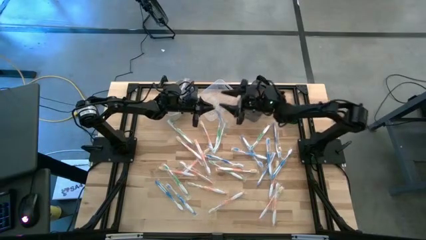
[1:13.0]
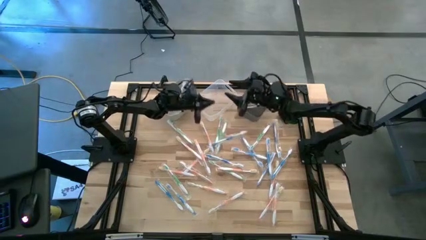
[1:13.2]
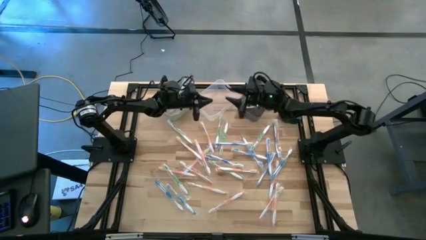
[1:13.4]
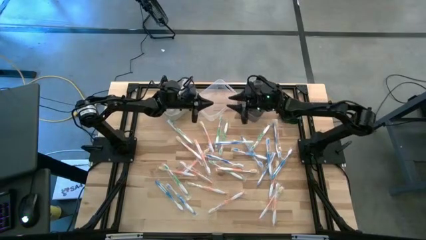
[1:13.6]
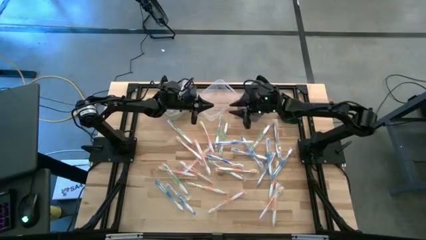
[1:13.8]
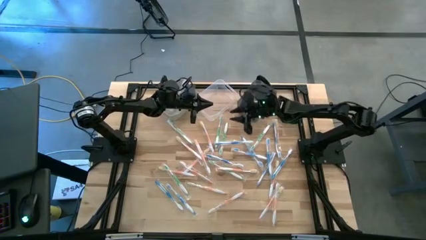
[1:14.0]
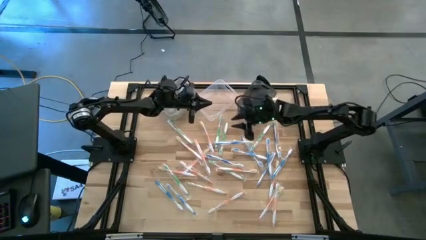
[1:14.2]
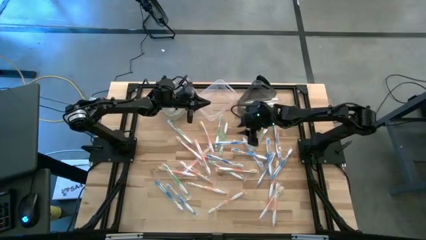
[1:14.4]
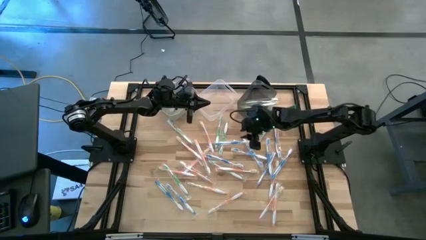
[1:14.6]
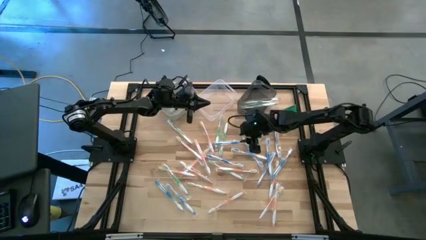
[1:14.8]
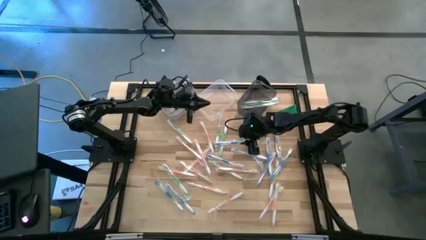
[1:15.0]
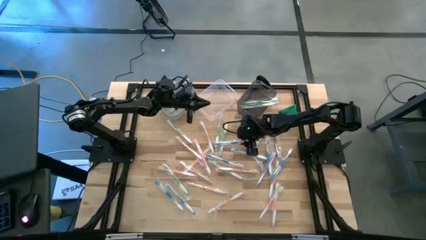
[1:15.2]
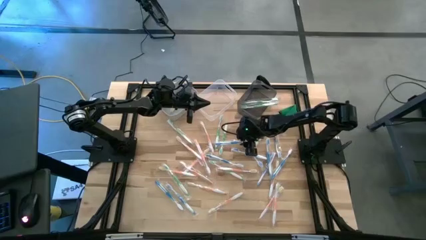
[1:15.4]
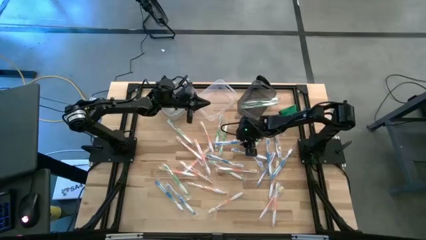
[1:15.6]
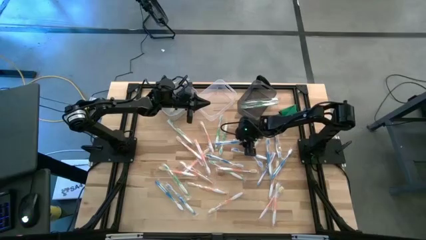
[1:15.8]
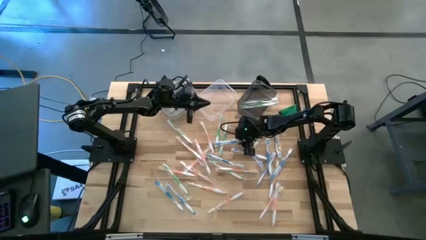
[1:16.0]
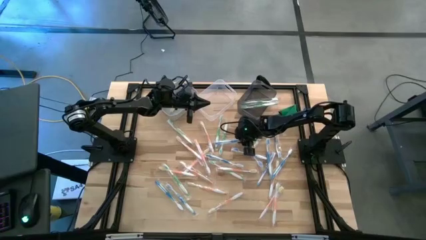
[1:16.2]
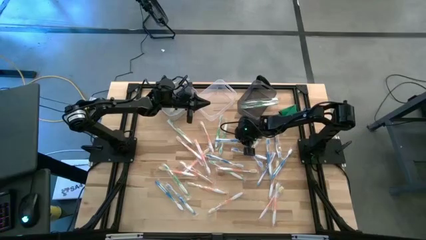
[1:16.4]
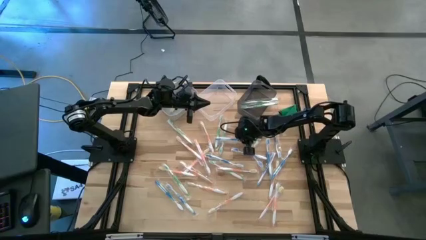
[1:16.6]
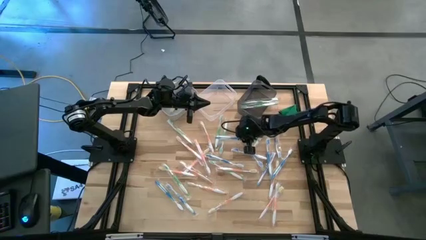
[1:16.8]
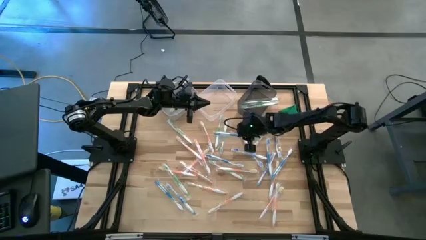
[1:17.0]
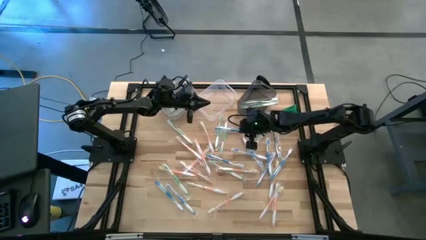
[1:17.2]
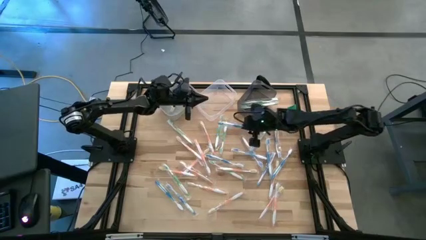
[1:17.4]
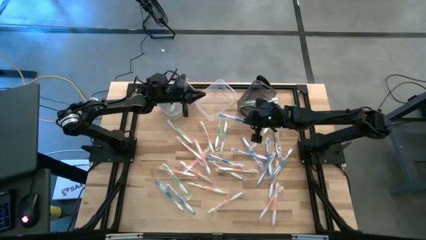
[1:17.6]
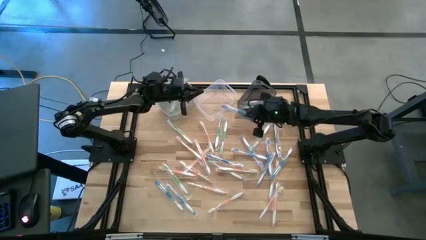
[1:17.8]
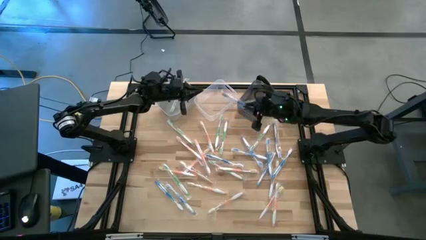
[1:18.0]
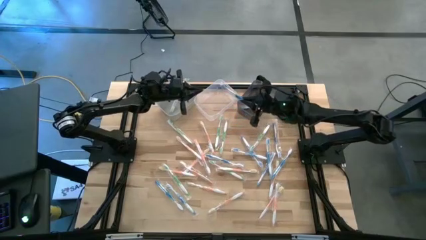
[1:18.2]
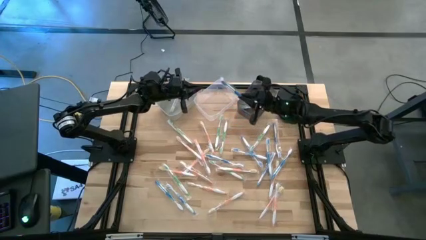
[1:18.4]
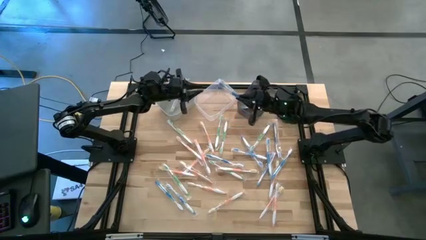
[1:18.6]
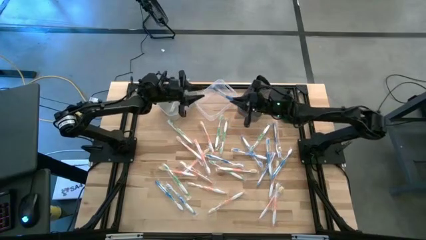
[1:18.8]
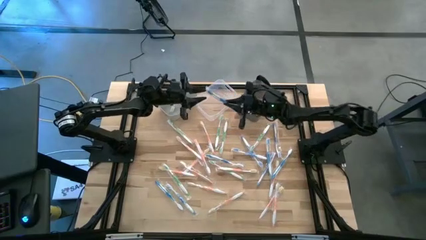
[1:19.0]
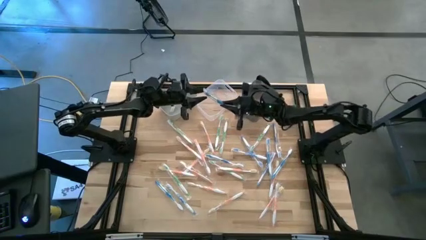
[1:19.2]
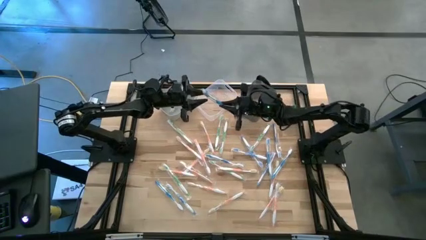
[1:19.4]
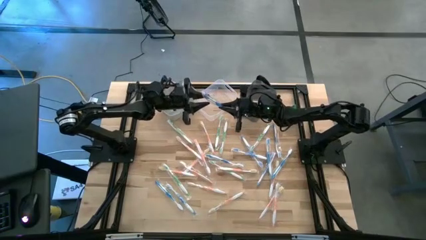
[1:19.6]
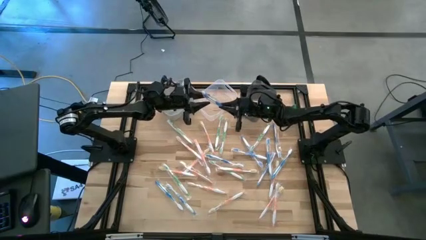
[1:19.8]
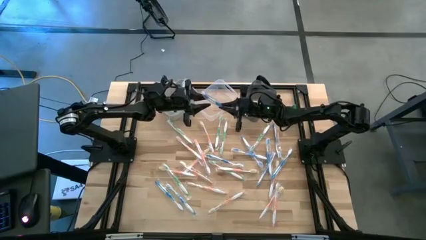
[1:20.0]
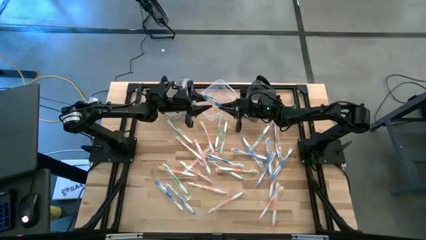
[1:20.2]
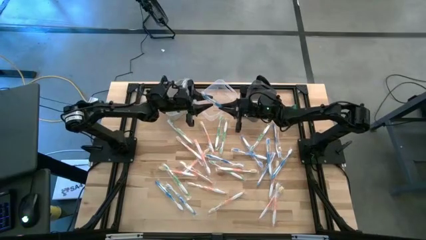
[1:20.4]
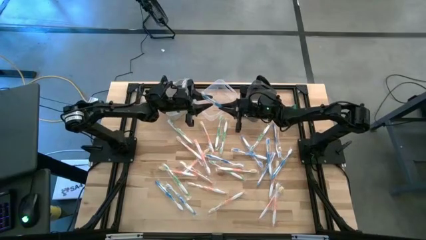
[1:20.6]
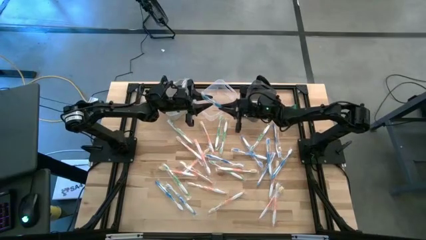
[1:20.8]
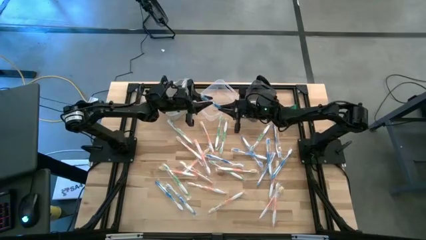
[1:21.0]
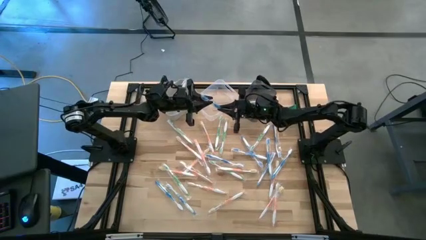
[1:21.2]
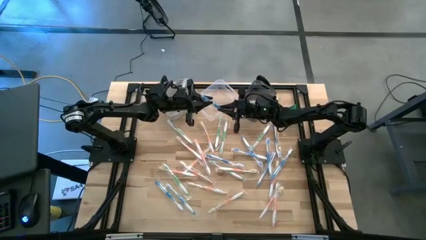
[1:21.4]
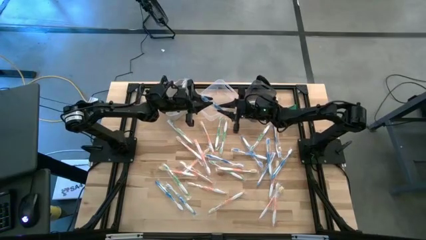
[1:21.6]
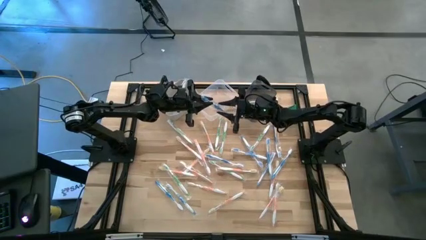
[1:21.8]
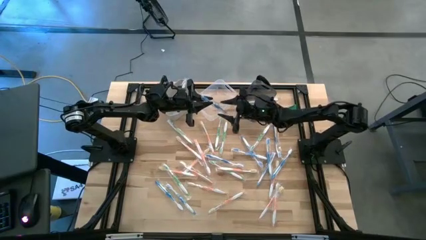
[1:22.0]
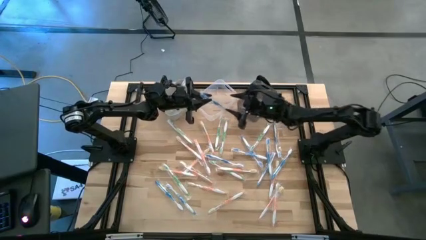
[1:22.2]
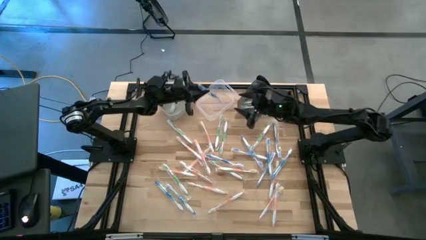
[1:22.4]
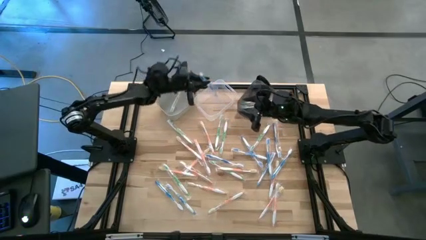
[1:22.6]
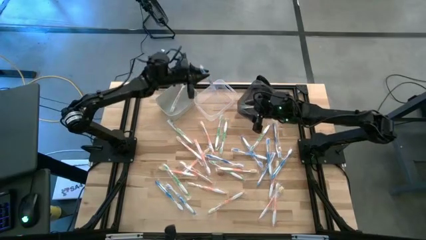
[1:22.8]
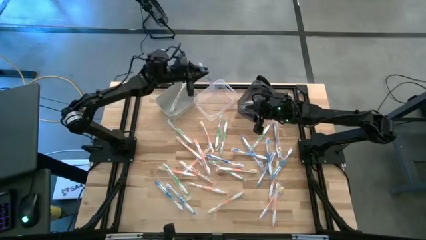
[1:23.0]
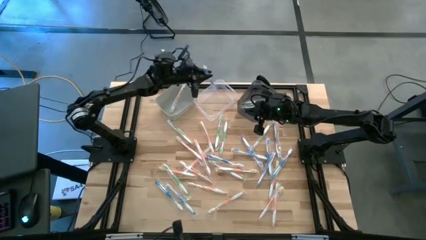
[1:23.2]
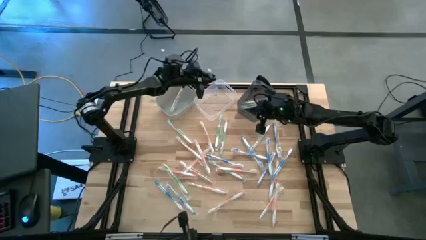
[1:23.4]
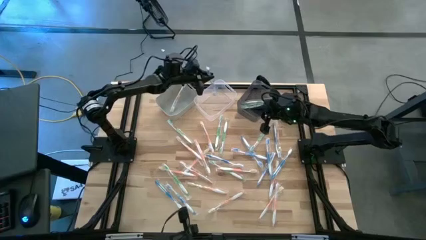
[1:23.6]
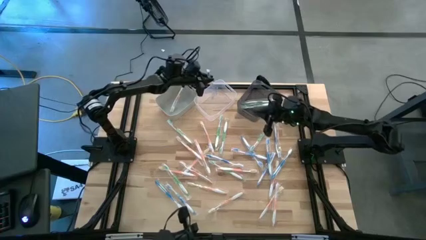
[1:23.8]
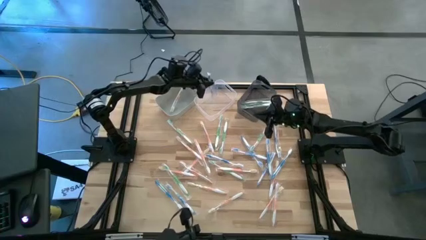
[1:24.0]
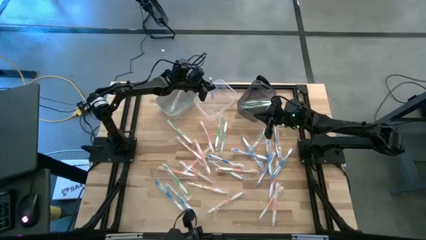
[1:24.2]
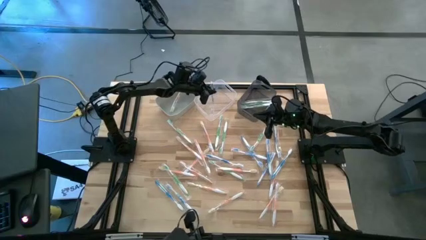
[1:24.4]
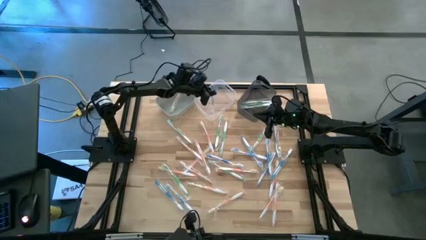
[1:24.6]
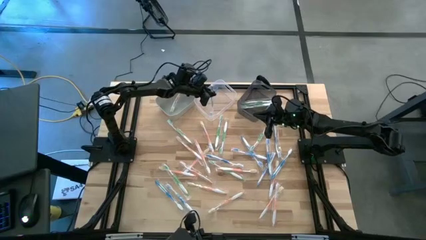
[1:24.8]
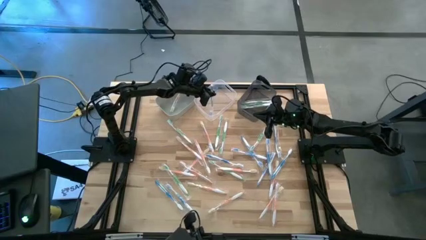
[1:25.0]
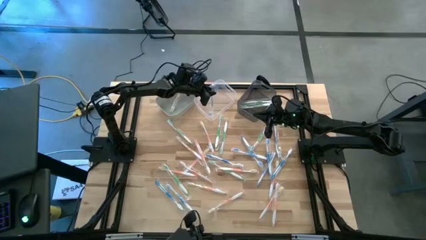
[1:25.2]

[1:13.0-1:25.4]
Task: Pick & Place Toothbrushes
Put the blue toothbrush into the transparent bin

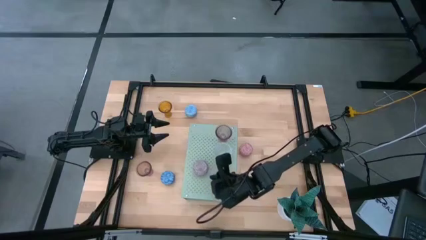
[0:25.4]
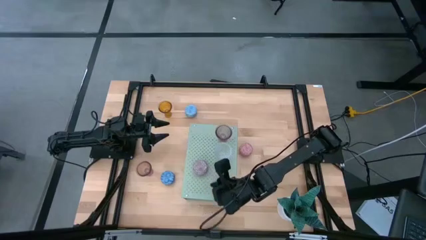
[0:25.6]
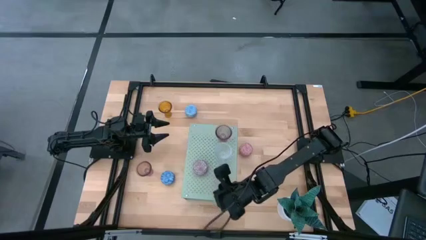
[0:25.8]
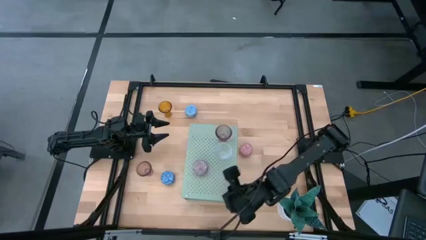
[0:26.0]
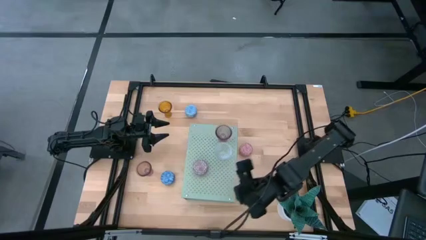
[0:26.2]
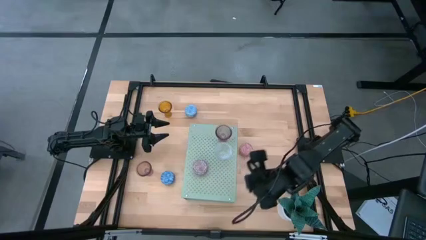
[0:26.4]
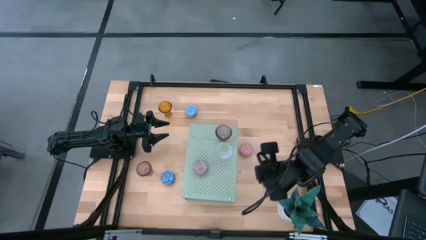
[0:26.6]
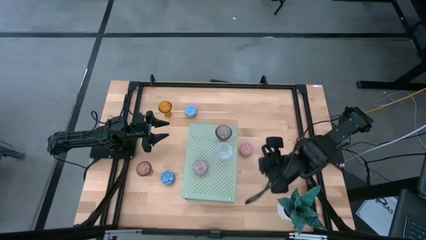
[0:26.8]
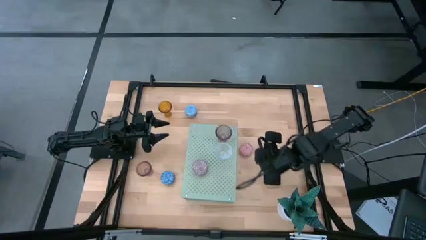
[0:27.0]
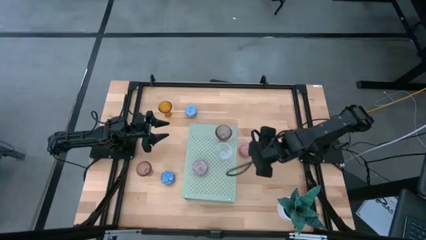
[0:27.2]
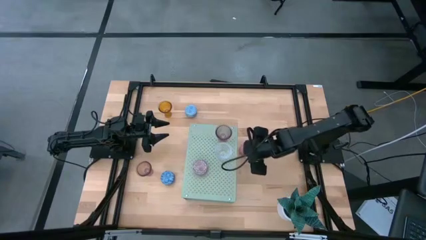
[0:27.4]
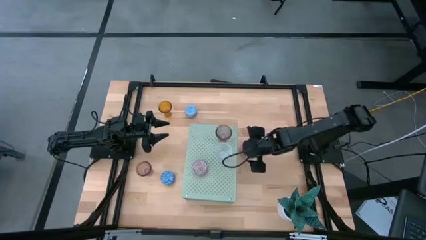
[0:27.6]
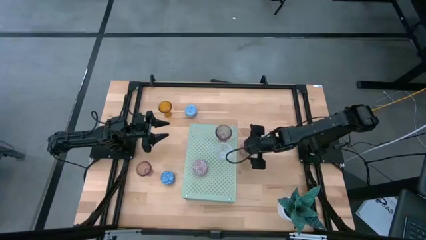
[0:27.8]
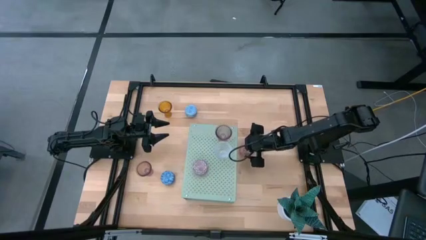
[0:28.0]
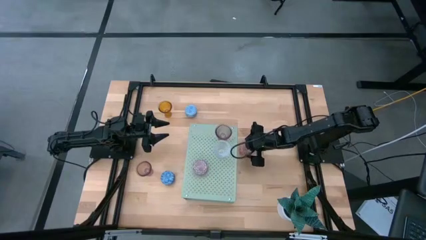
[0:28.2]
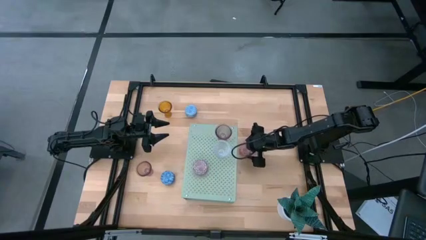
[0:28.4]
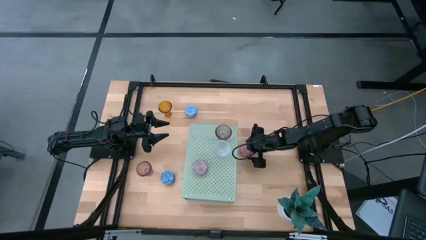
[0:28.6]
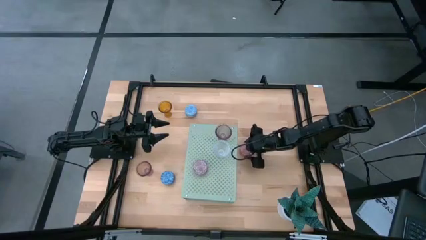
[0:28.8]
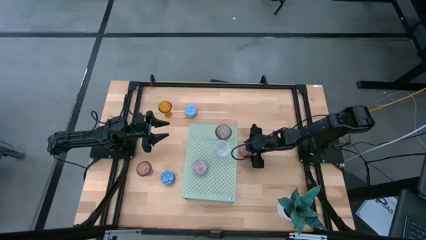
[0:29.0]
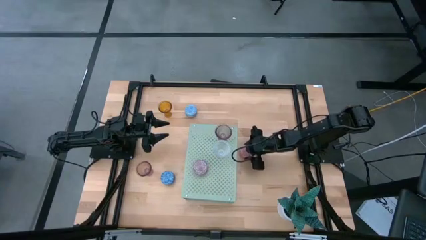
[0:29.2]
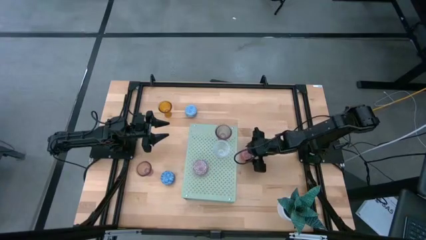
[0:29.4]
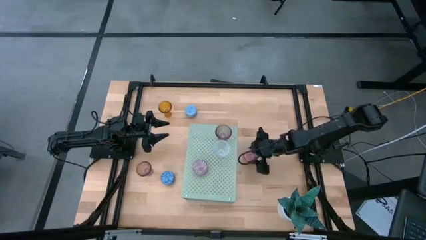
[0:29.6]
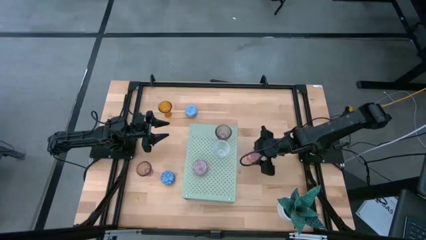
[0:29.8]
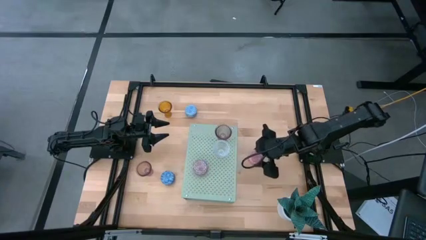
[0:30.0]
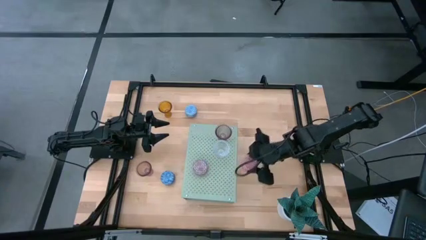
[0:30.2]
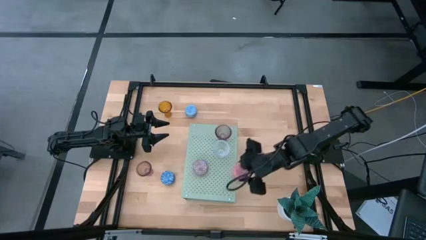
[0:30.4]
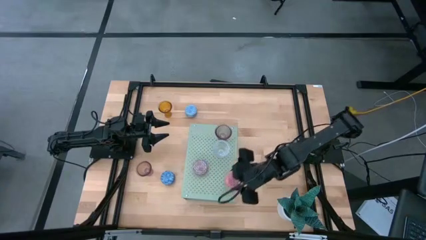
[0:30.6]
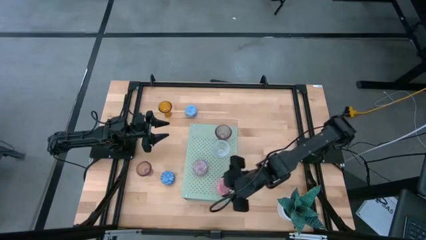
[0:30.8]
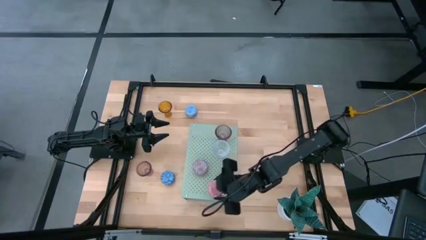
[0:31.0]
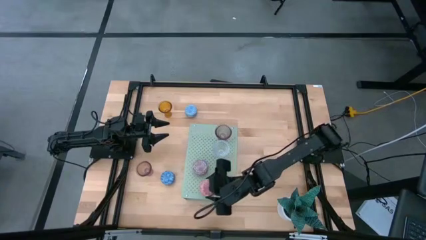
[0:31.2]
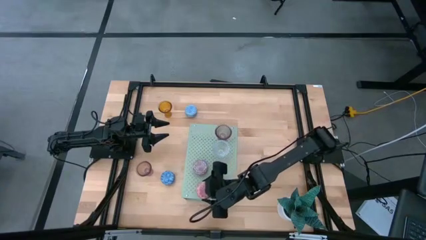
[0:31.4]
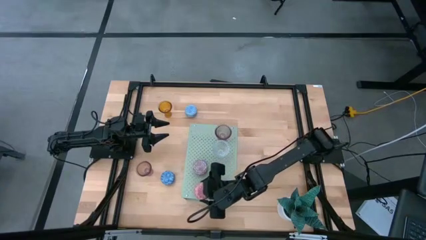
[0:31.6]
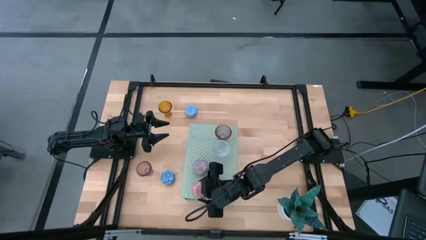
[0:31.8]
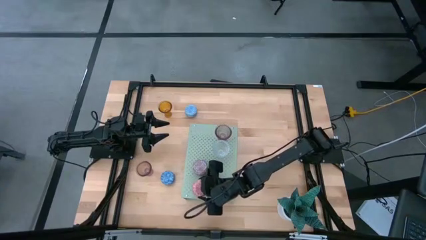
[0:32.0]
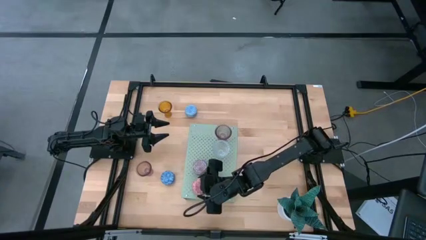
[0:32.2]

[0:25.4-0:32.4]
Task: Pick & Place candle stick holders
Put the red patterned scented candle on the shelf
